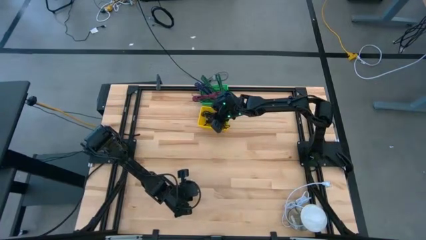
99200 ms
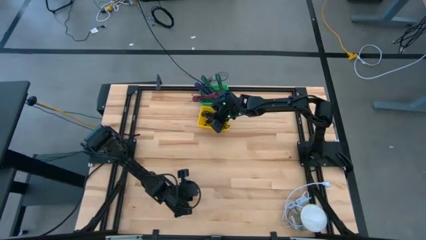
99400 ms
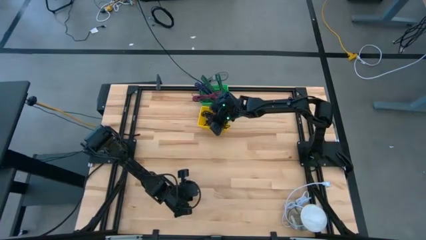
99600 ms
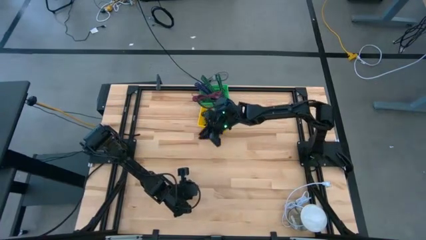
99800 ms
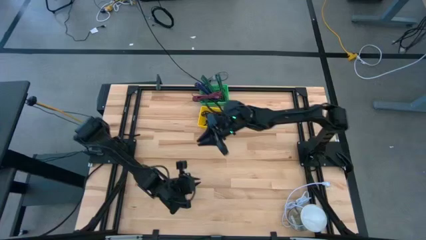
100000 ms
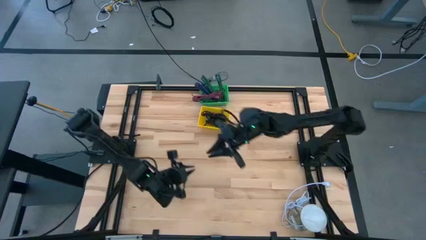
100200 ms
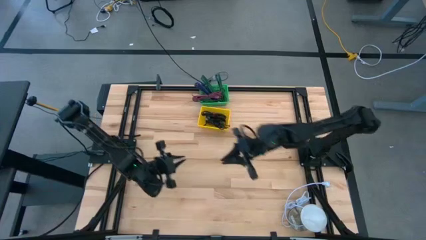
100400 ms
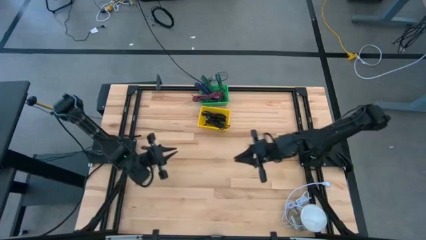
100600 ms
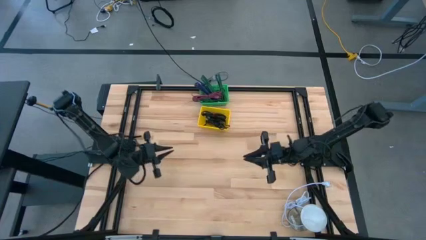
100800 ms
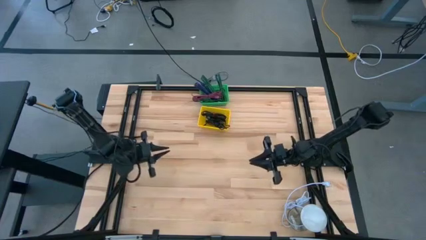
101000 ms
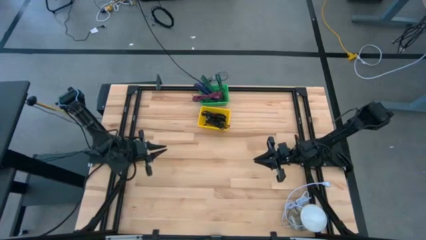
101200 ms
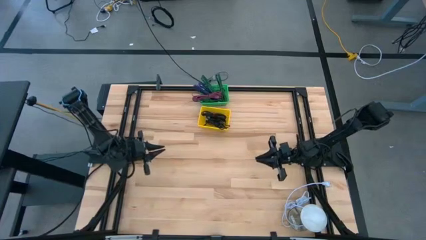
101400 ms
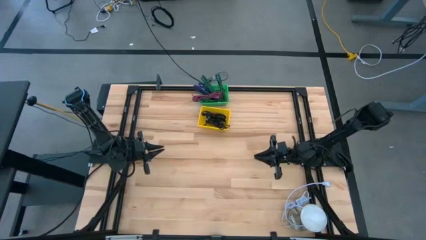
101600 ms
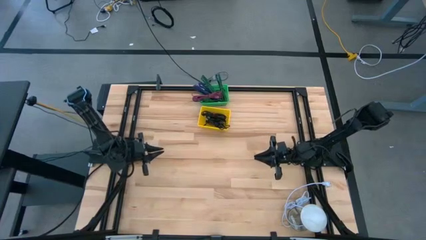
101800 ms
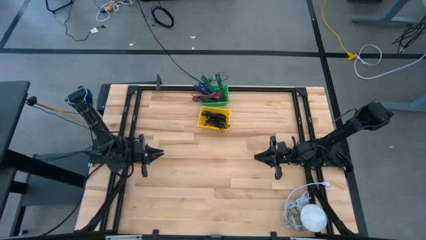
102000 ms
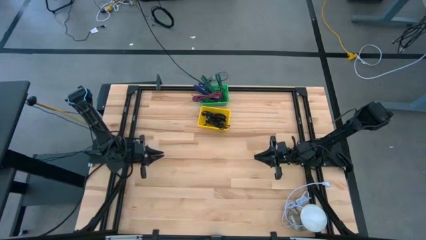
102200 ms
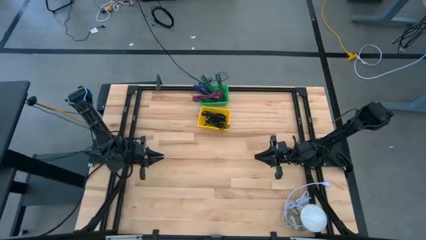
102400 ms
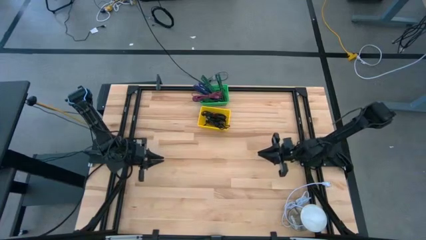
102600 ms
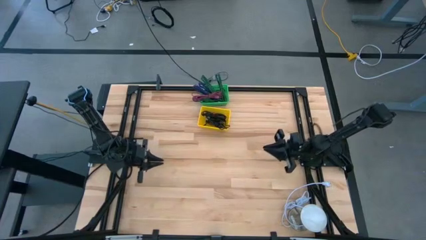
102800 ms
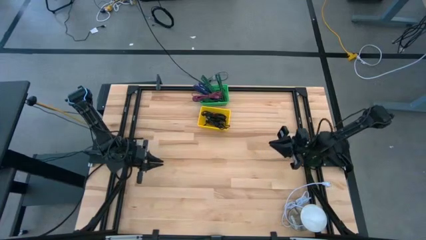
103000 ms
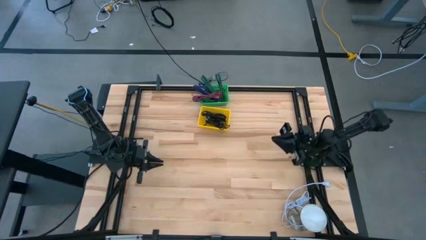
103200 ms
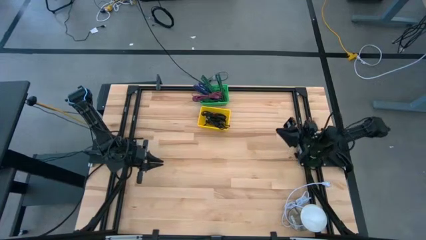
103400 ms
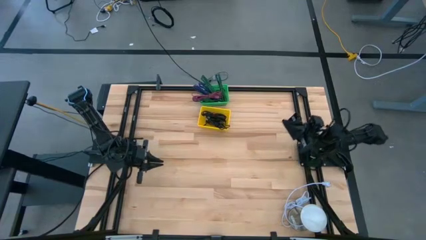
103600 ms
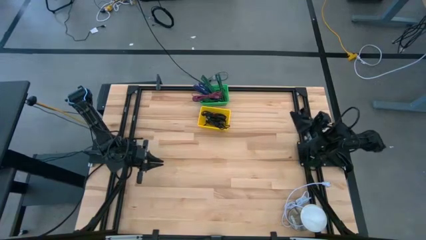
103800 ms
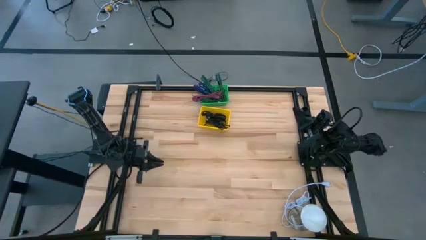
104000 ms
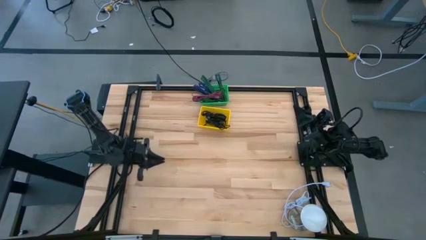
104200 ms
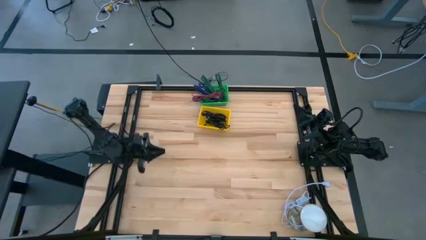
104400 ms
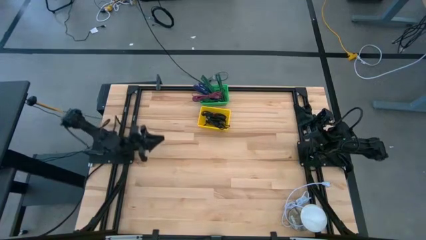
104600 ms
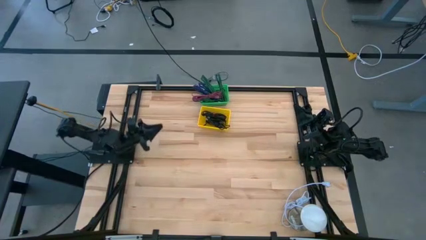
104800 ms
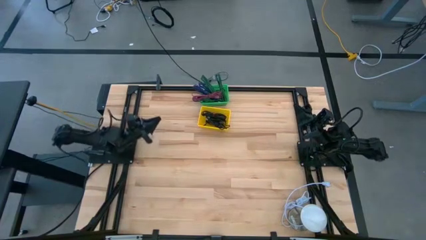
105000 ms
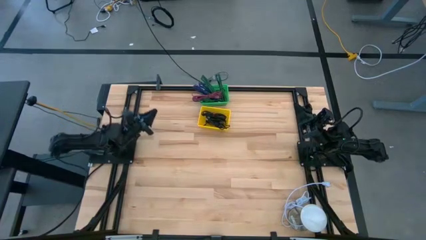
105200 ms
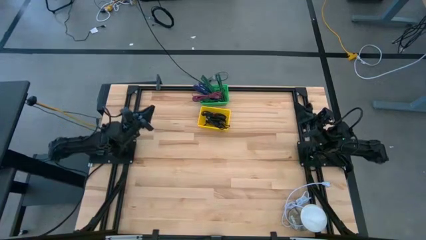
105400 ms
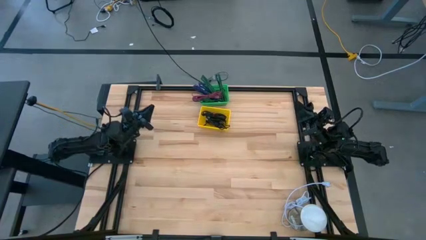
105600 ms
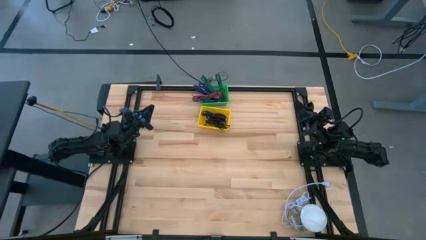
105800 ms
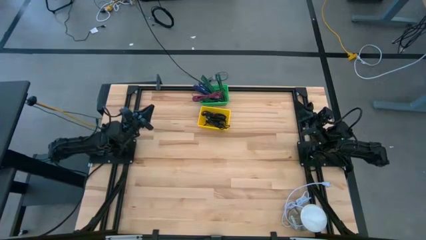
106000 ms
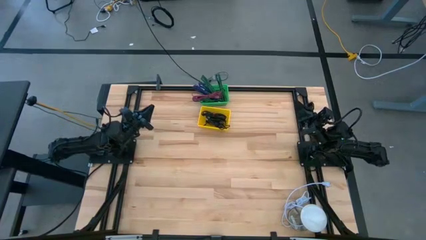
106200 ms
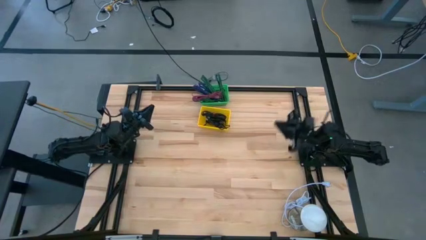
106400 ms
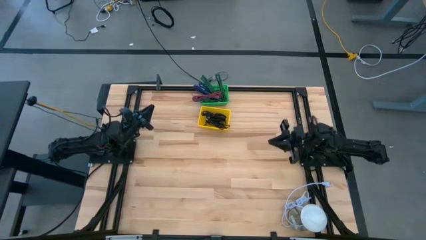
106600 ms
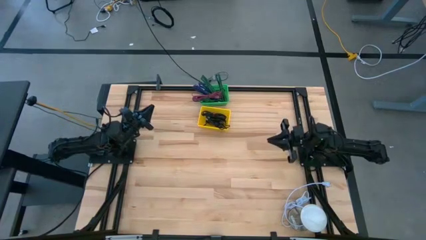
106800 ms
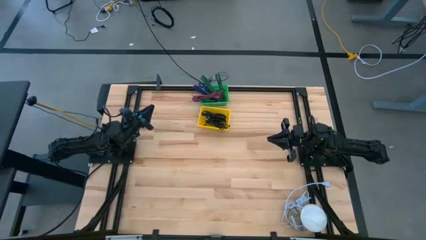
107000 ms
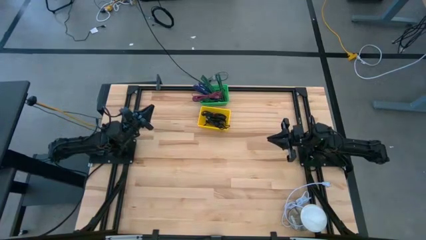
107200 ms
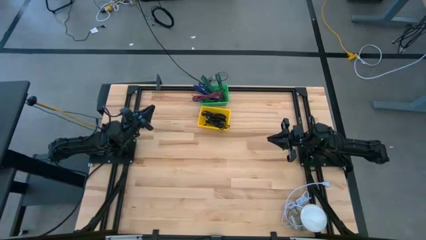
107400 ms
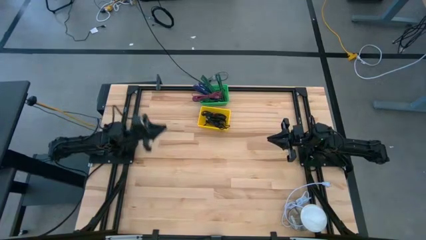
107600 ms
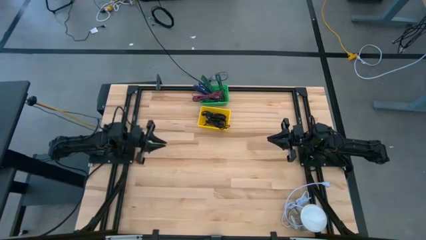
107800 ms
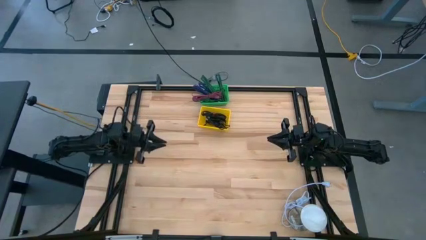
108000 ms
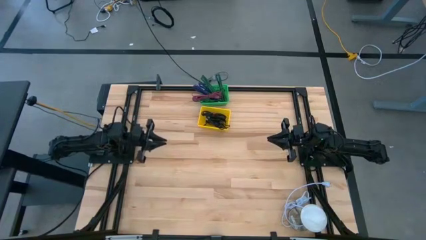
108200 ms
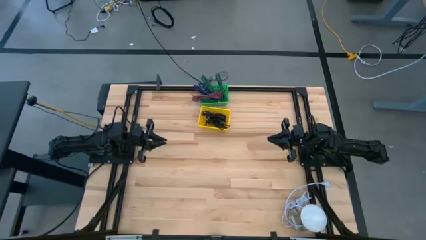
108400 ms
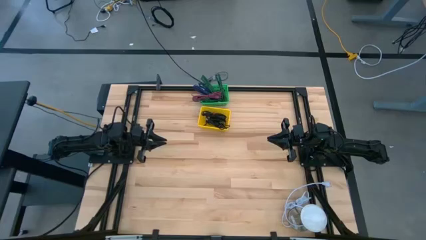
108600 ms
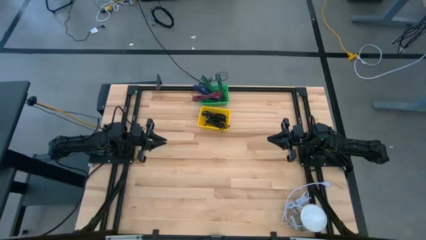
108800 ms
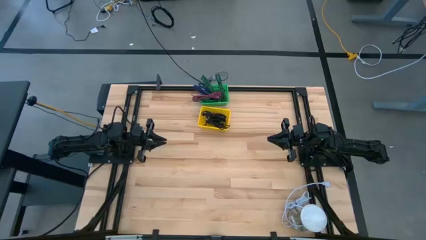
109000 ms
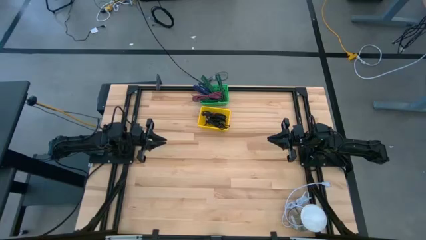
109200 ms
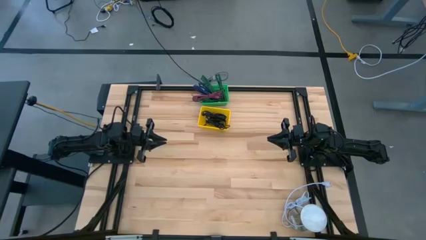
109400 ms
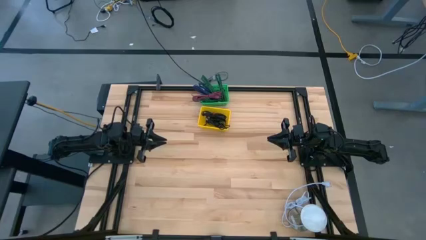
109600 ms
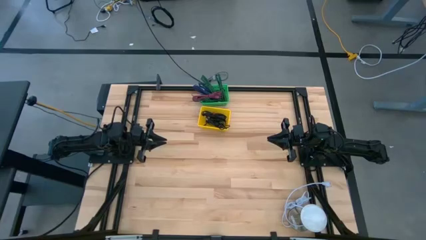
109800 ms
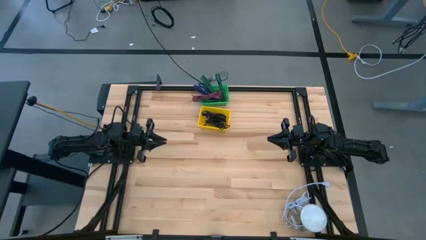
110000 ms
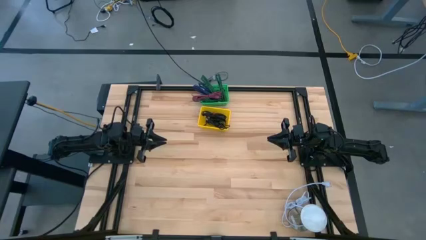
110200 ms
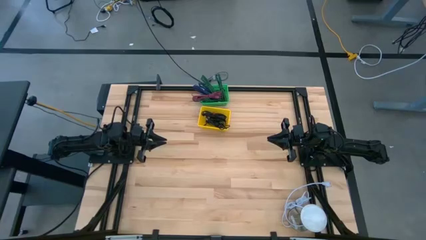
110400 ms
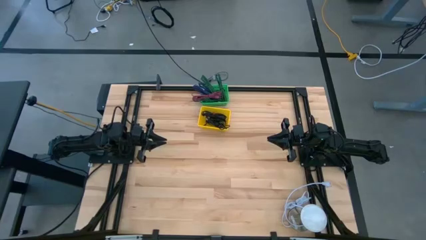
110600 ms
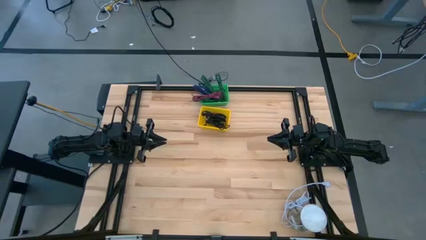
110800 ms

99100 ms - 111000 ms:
Task: Pick & Place USB Port
Return to Home Position

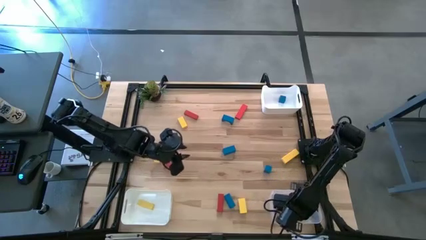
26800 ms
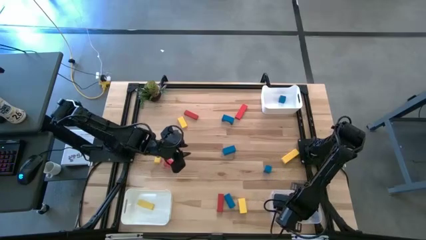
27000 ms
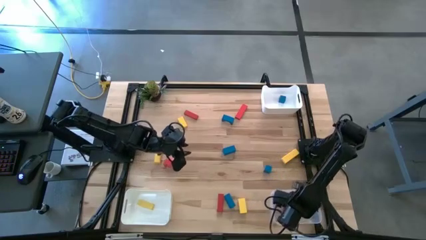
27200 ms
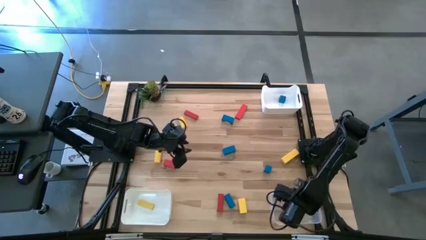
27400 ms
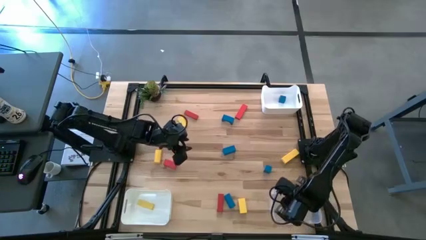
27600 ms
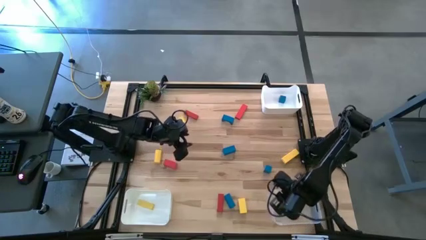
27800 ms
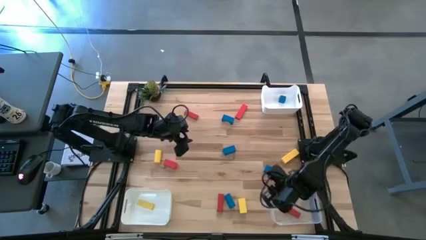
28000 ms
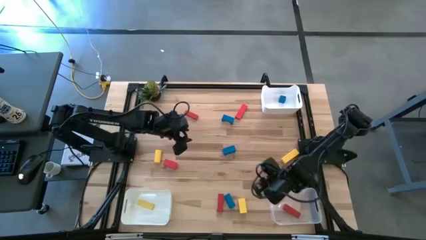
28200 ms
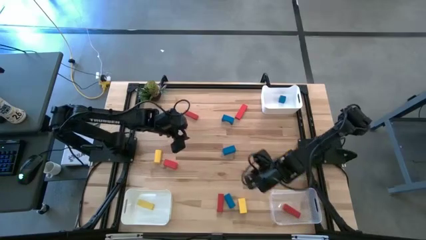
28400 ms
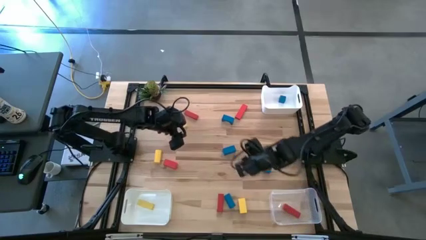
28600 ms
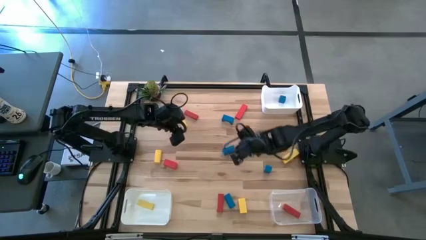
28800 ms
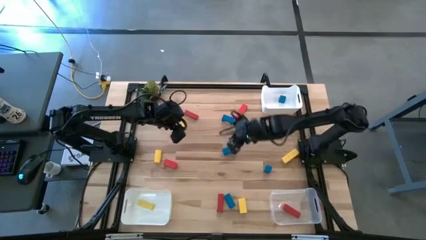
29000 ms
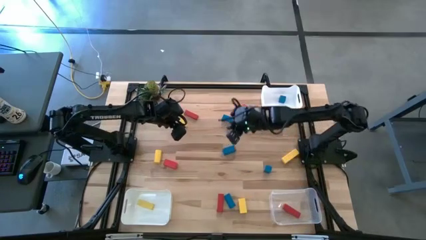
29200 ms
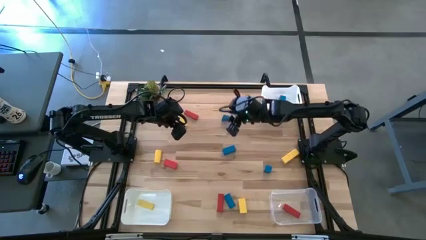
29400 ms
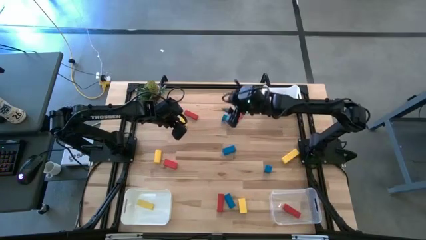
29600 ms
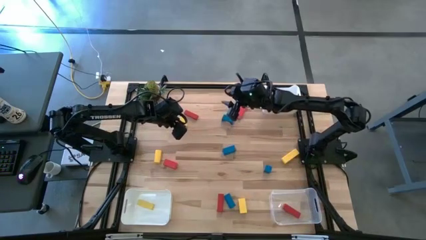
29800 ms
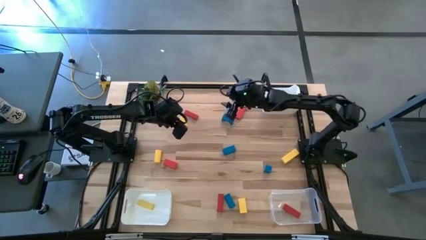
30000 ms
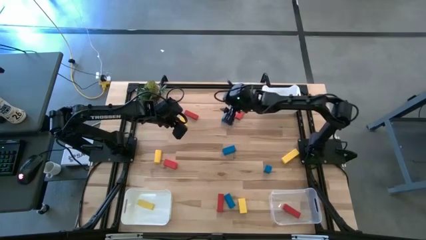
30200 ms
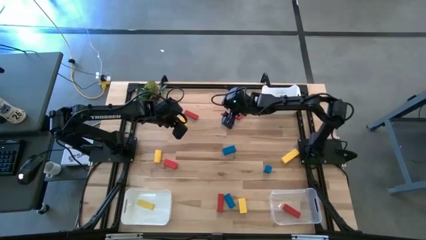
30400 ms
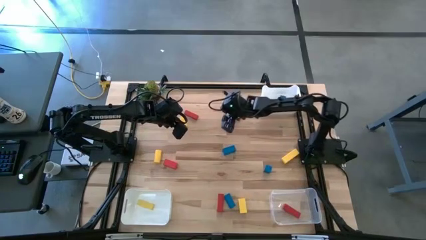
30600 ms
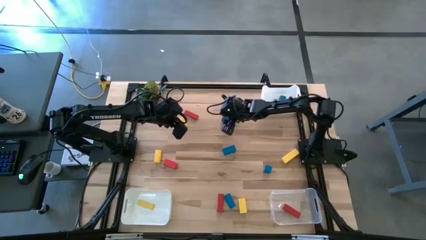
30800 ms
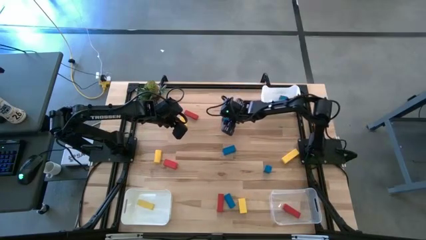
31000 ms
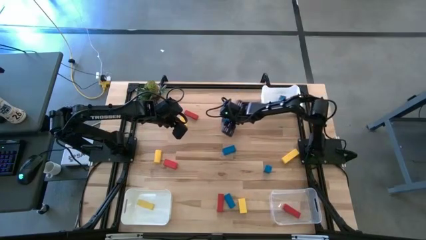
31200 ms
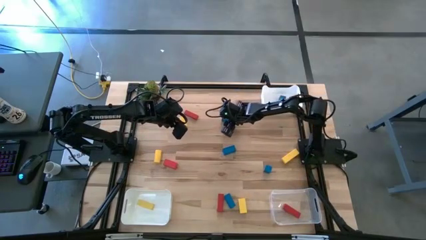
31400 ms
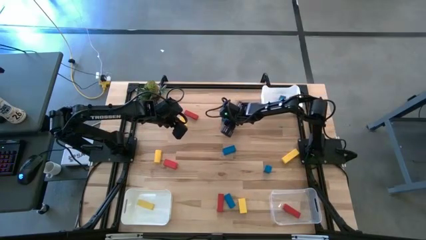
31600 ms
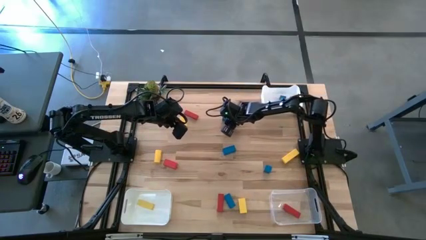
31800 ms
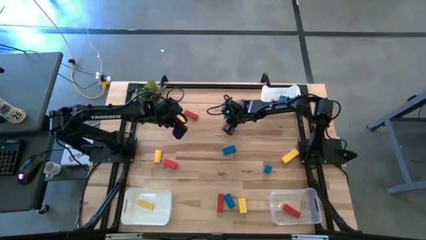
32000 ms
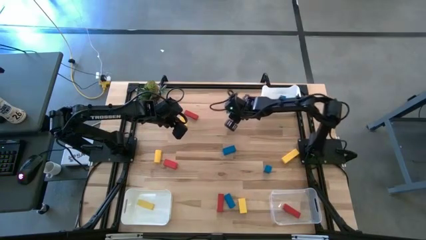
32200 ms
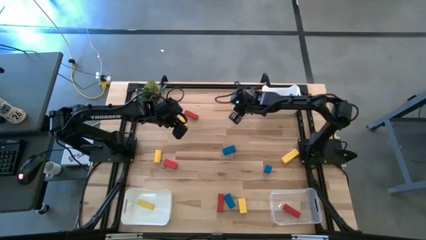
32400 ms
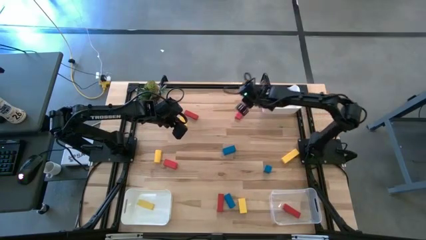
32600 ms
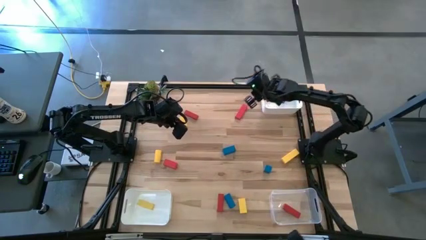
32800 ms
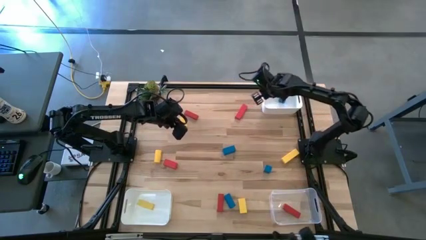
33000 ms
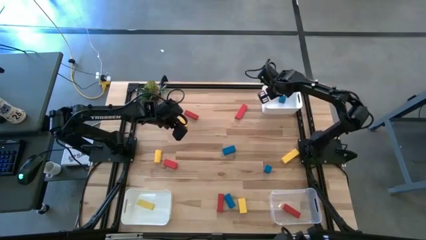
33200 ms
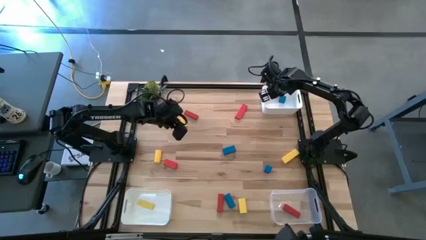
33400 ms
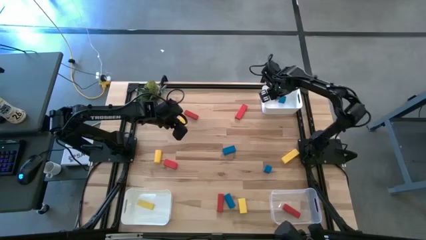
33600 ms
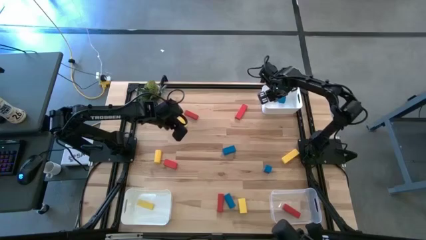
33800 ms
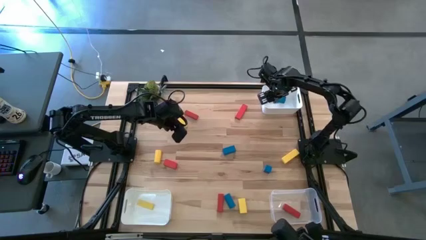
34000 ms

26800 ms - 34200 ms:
Task: Sort & place blocks by color
Put the blue arc block into the top white bin
